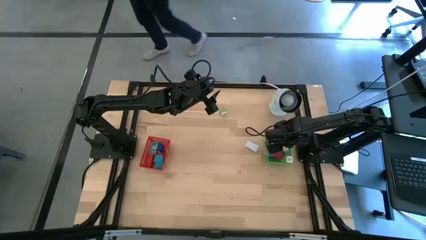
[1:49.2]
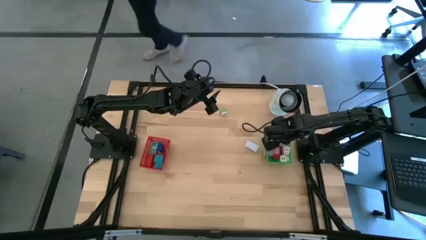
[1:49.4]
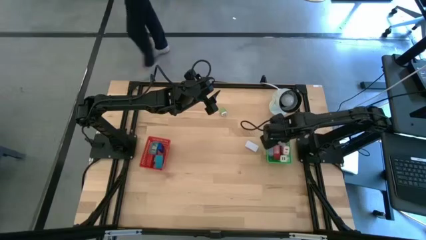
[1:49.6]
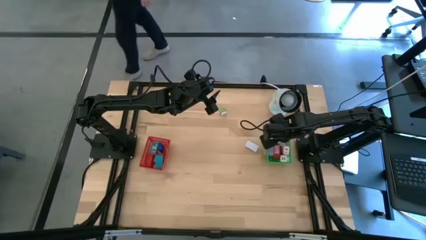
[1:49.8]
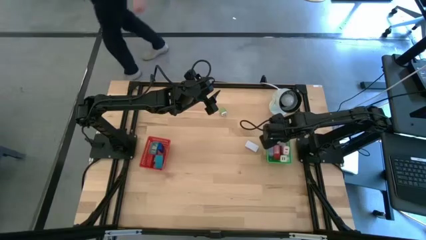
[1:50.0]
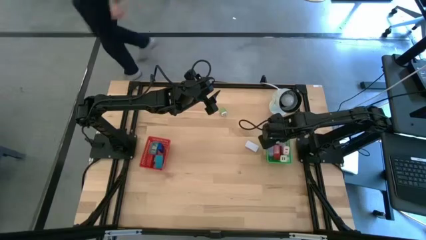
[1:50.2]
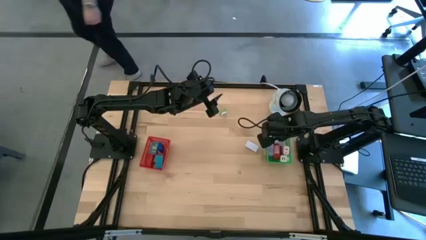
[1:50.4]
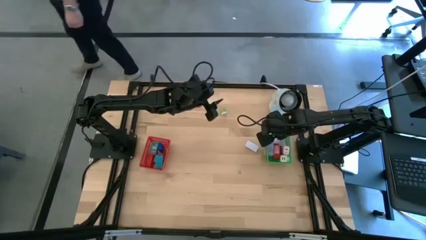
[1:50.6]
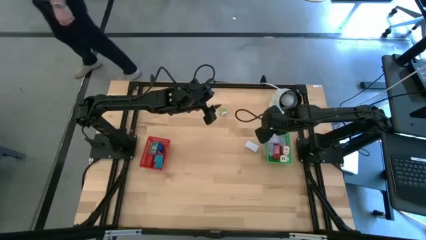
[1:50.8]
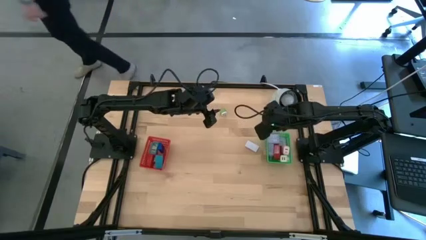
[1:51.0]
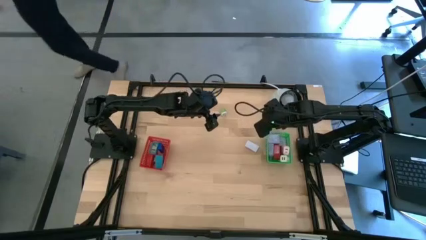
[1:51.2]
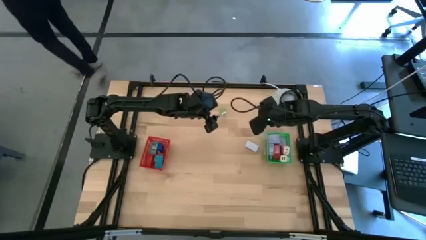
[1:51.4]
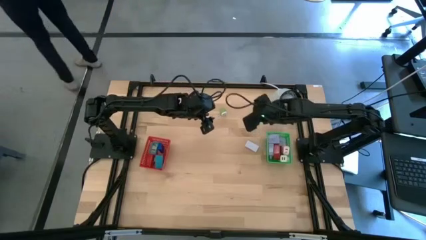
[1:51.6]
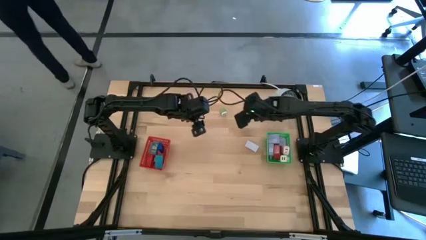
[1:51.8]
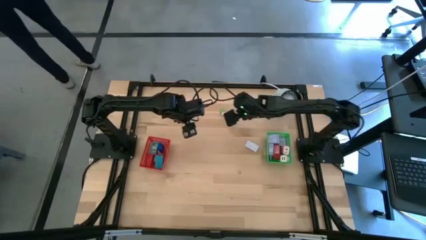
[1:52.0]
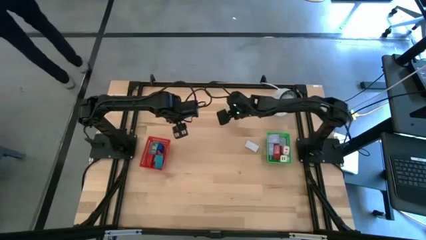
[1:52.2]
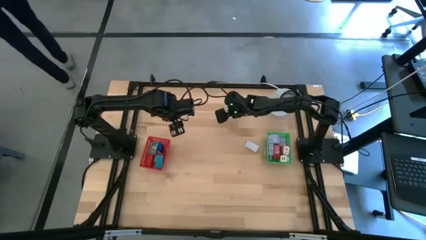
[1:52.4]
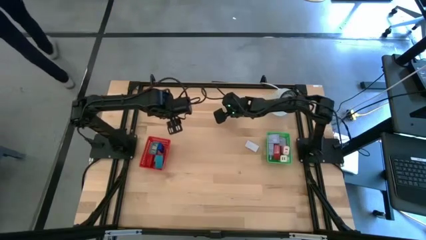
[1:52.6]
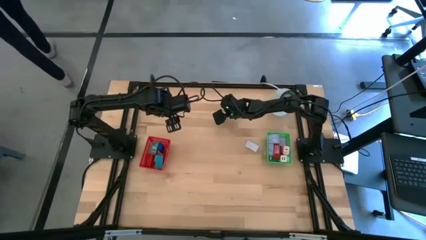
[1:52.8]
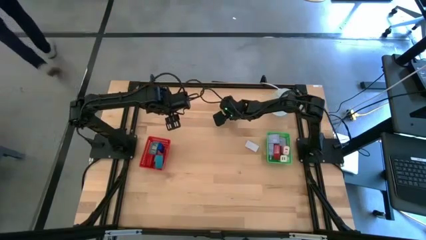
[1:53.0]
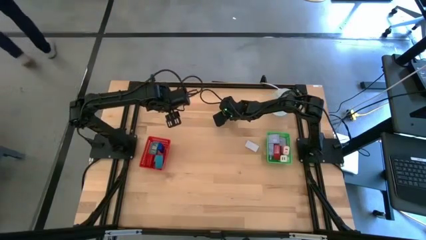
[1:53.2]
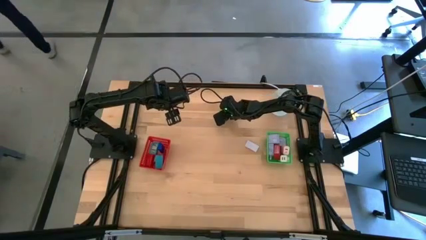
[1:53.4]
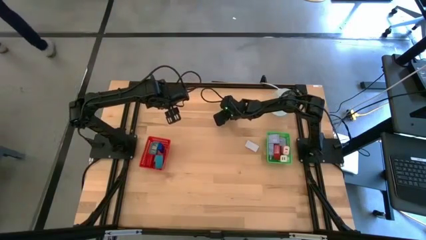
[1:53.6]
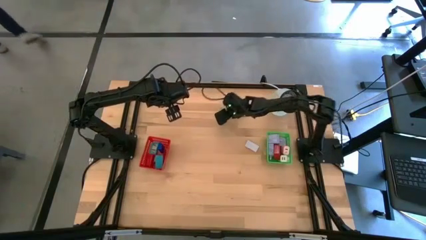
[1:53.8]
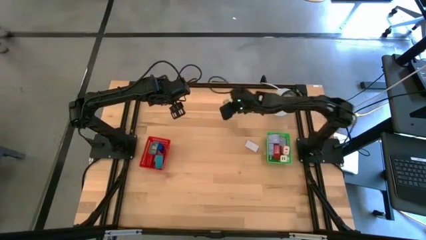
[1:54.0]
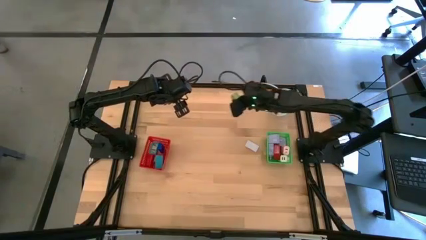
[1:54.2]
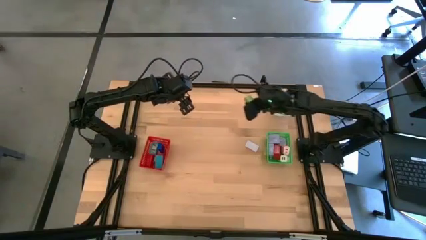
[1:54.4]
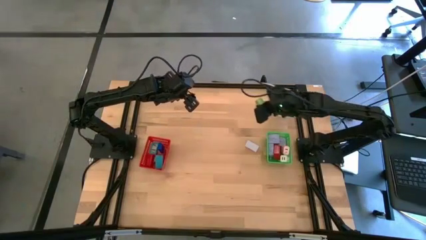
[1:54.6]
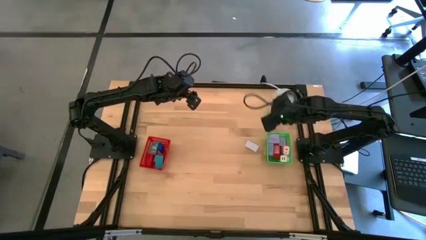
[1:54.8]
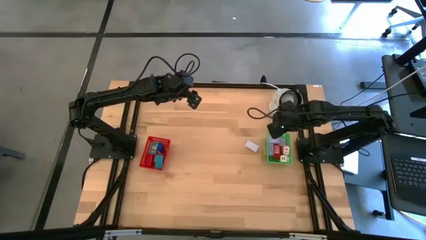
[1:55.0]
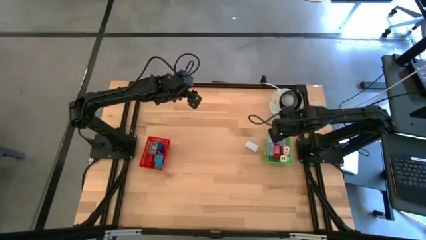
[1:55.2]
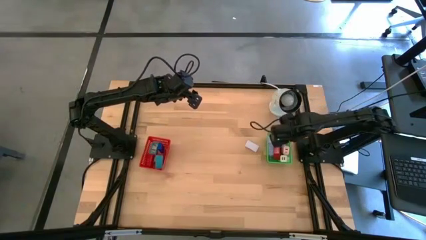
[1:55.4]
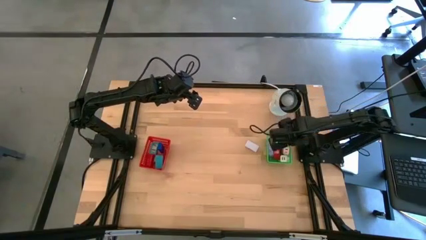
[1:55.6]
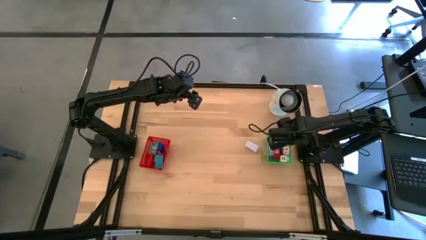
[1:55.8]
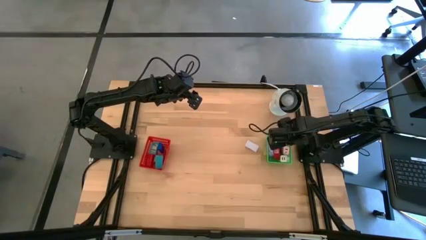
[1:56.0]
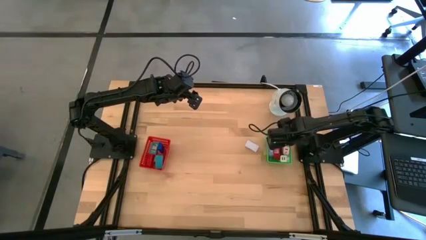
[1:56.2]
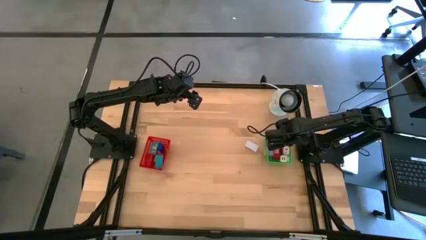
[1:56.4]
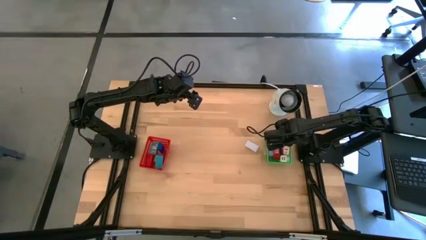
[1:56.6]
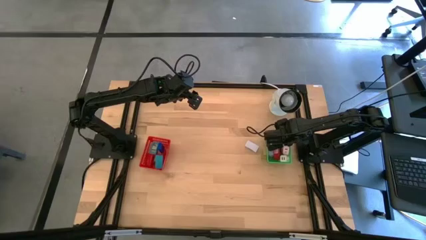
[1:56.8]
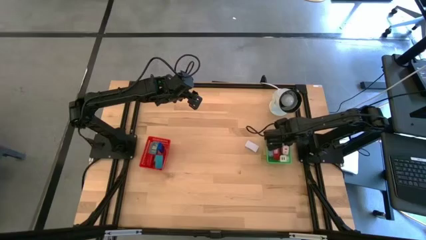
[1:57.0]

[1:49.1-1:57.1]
Task: Pick & Place Office items
Put the green charger adapter into the green basket

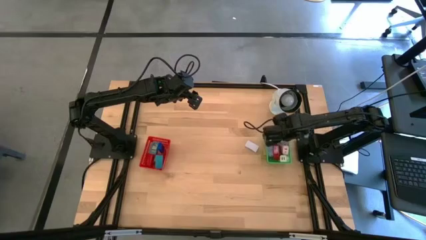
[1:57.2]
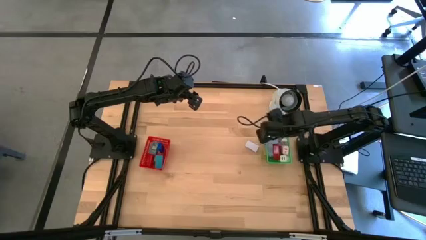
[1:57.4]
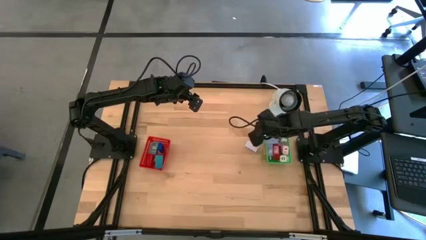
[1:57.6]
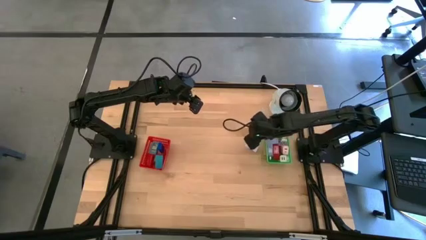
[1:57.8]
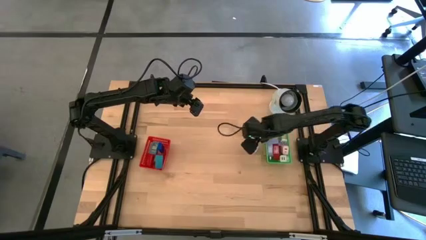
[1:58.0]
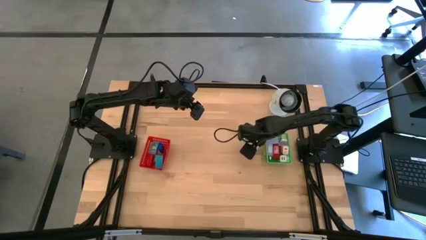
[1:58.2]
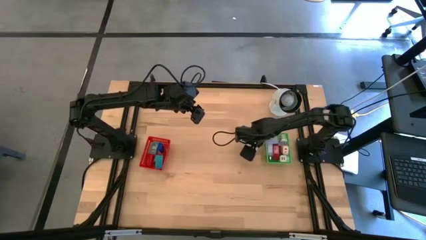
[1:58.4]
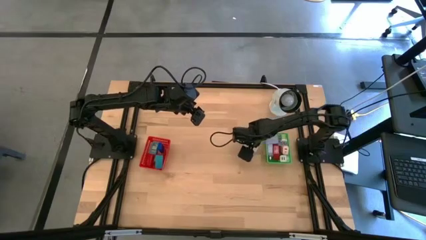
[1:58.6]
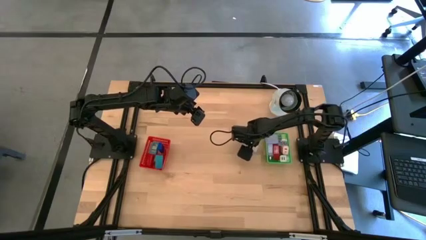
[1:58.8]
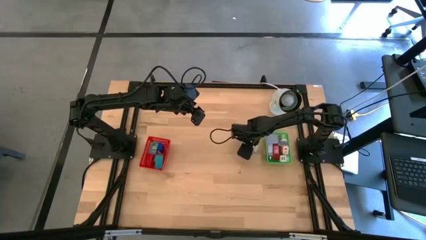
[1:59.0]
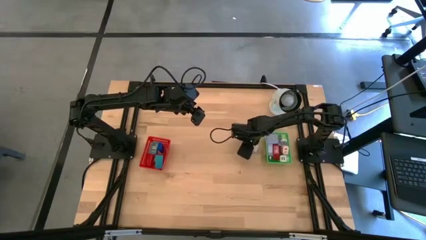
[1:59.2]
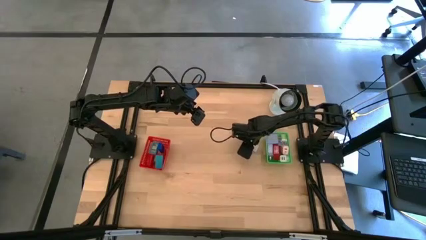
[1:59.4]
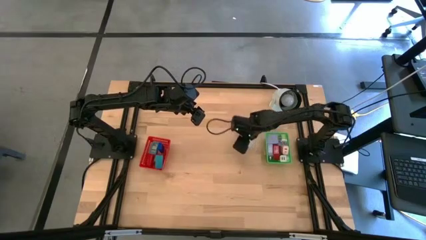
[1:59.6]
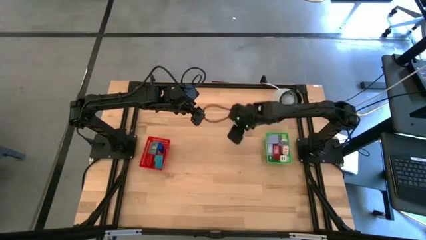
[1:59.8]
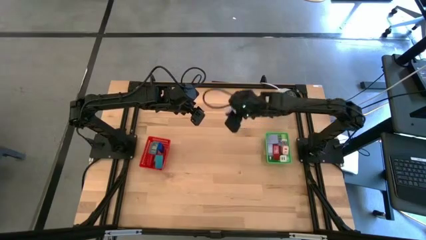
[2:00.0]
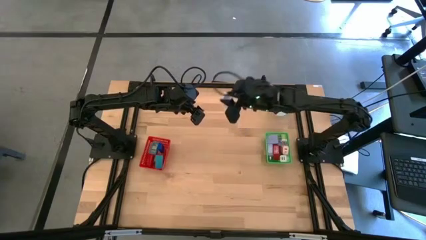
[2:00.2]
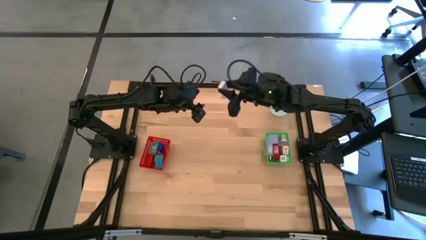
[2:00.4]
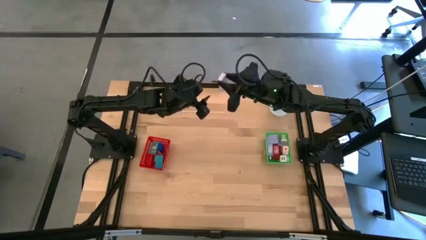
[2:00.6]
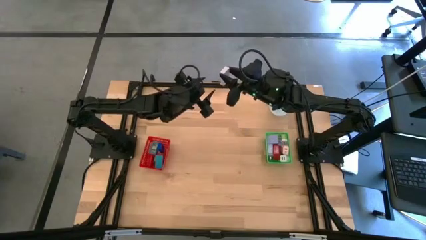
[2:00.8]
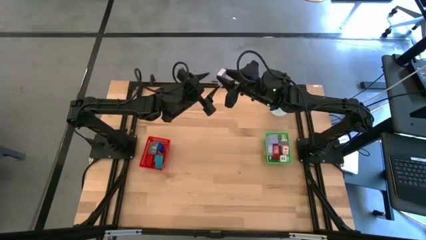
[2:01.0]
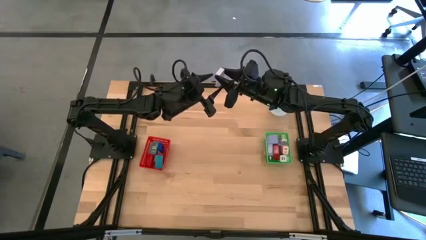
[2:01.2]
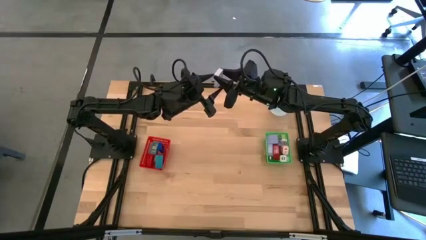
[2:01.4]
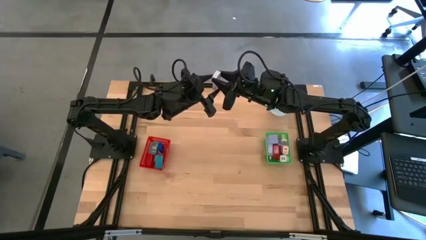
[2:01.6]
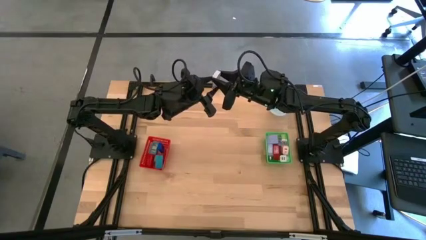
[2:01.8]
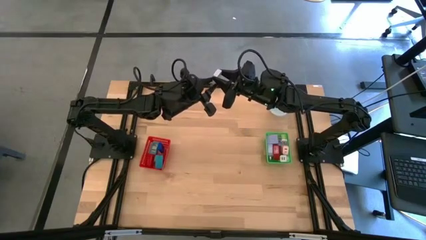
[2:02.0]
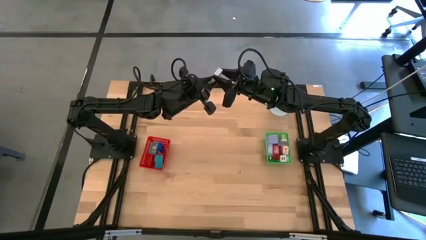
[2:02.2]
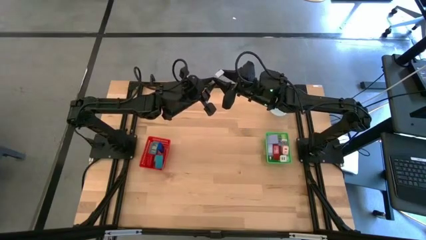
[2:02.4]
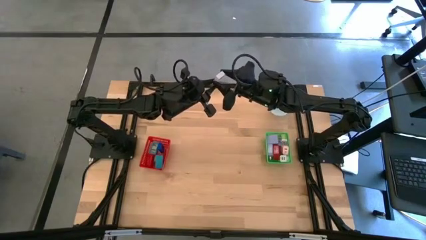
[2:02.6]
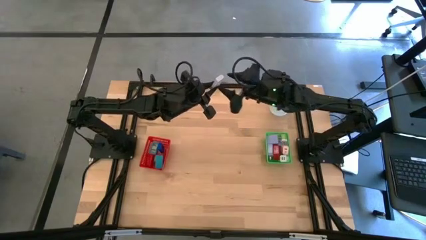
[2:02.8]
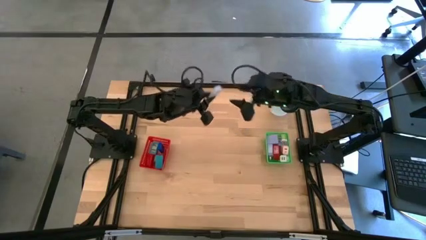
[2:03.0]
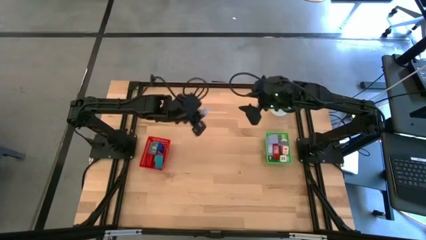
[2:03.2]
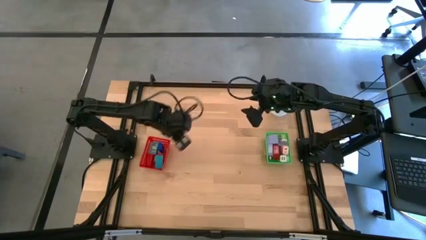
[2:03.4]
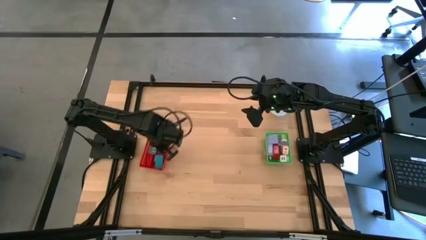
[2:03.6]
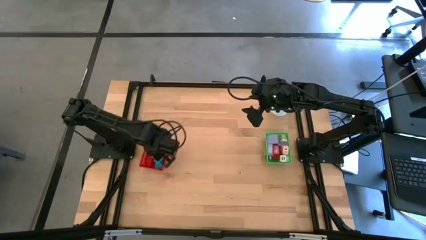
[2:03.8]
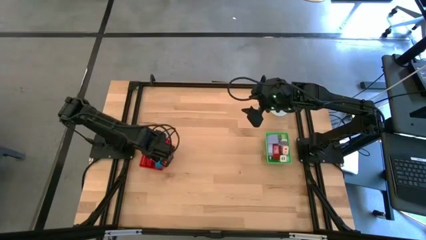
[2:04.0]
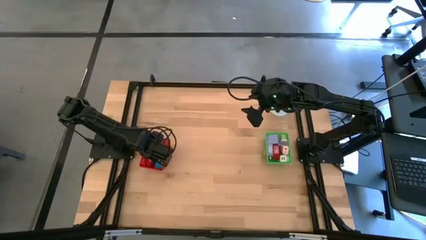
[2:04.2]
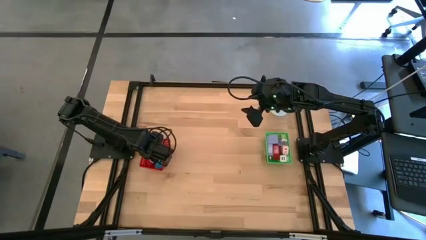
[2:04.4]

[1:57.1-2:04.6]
Put the white digital timer into the orange basket

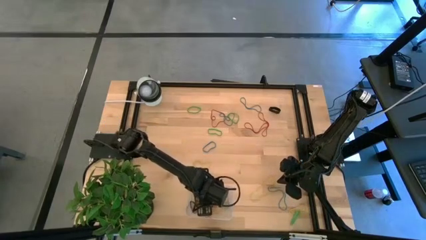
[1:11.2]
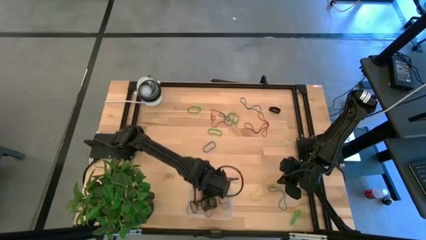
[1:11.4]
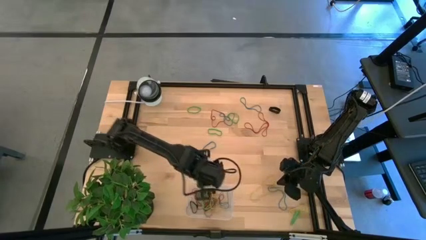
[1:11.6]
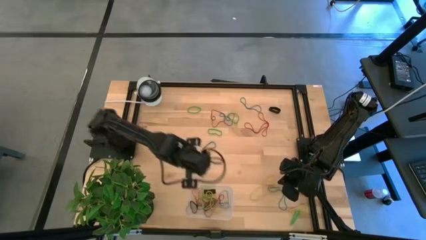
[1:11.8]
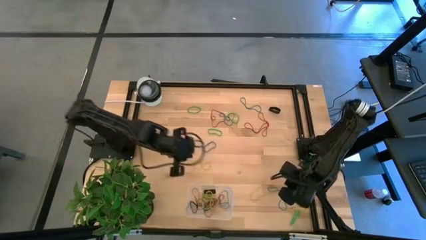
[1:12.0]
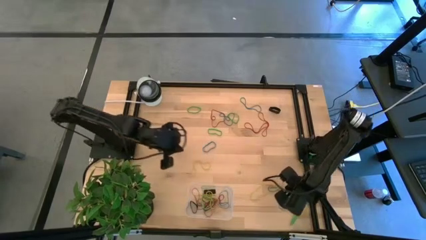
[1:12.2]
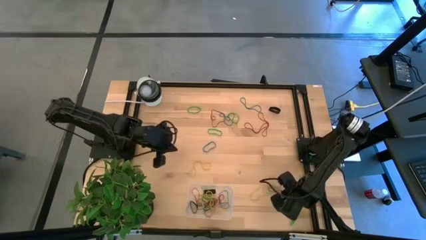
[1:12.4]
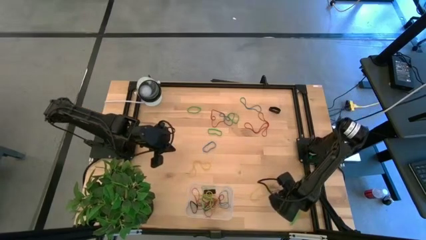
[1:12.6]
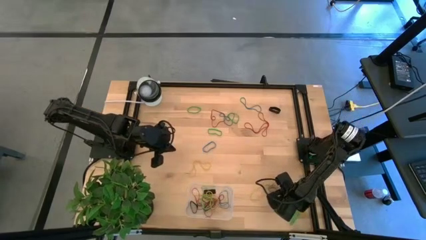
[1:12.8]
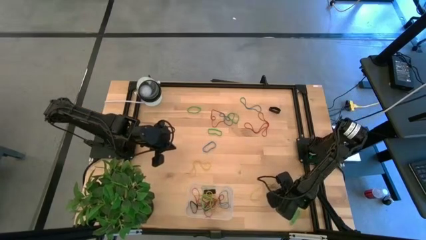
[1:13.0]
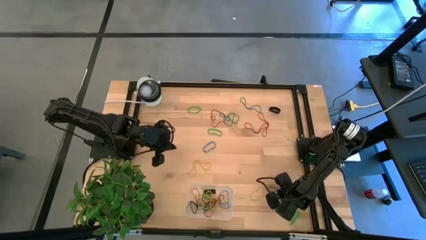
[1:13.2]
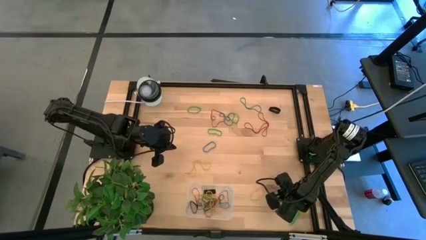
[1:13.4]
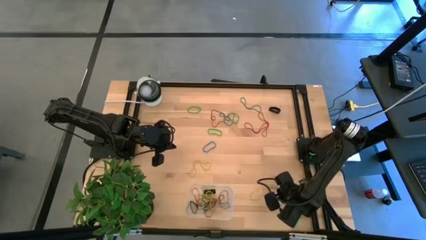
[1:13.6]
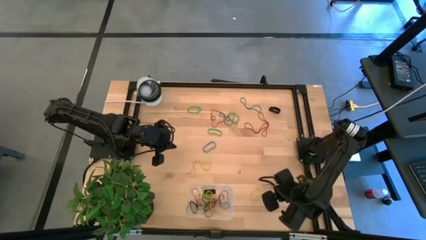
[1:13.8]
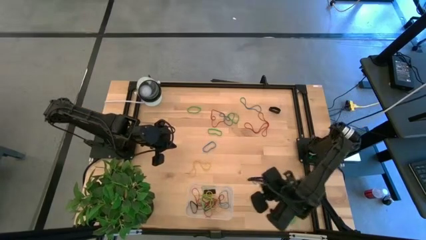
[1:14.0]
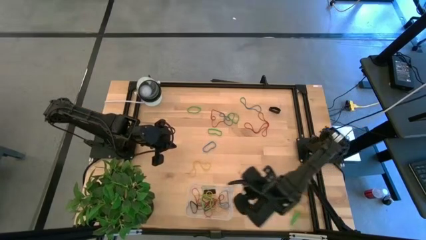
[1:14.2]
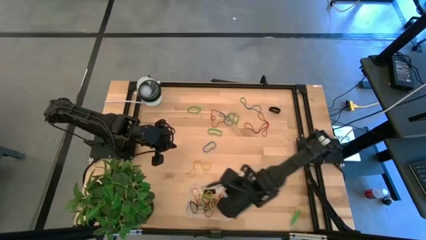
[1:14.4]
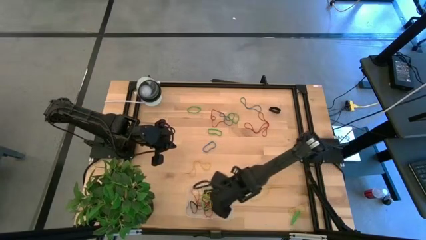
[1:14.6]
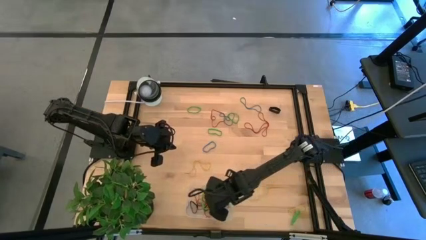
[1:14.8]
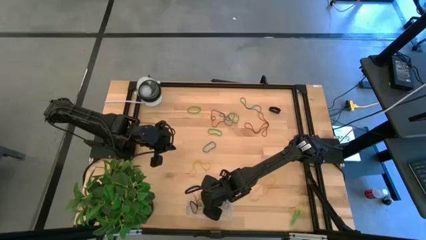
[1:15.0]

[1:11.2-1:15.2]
Task: Pick and place rubber bands into bin
Put the blue rubber band into the transparent bin
